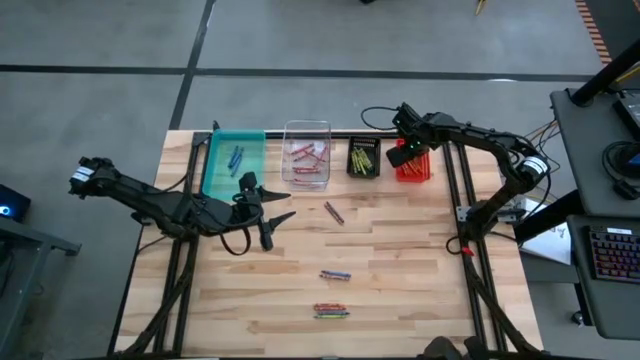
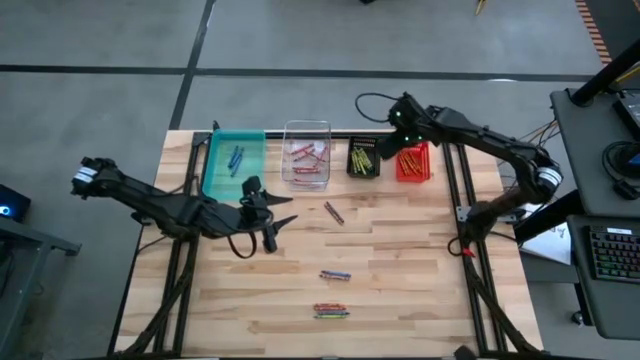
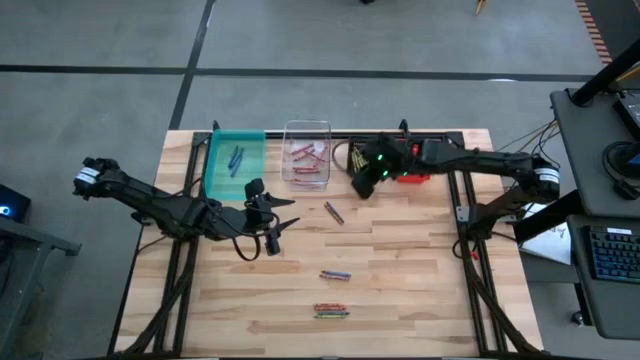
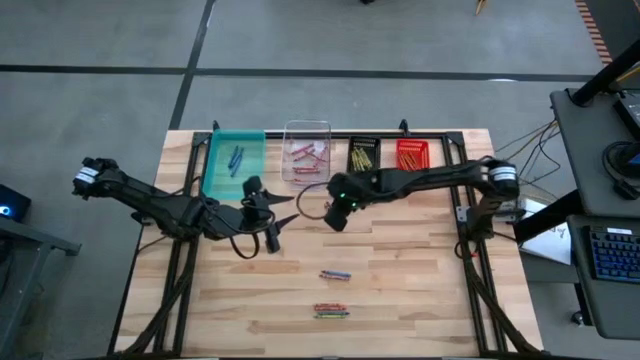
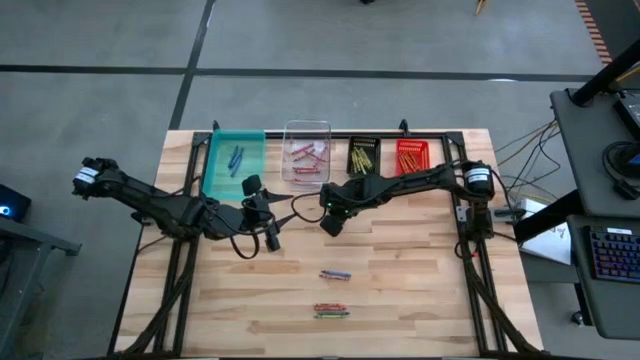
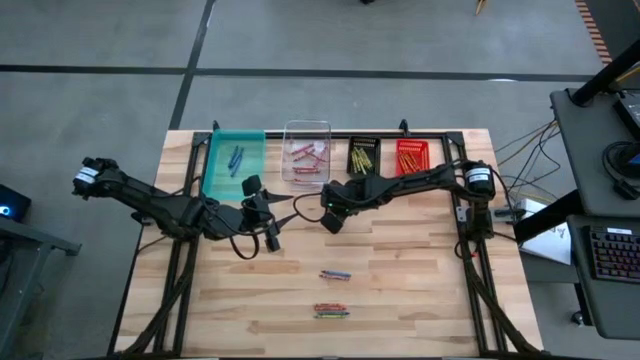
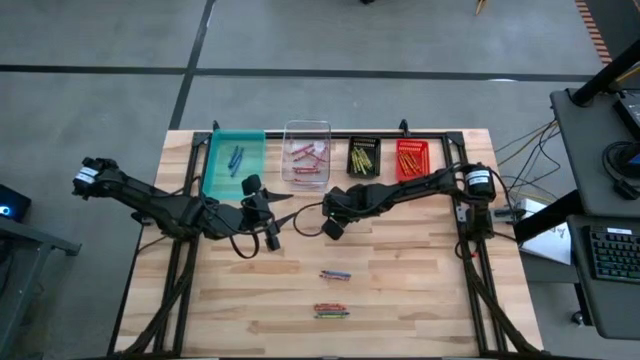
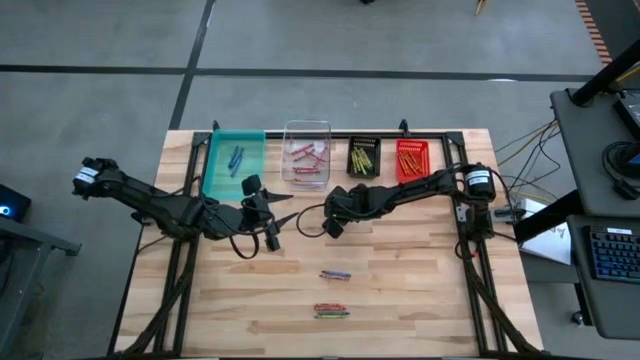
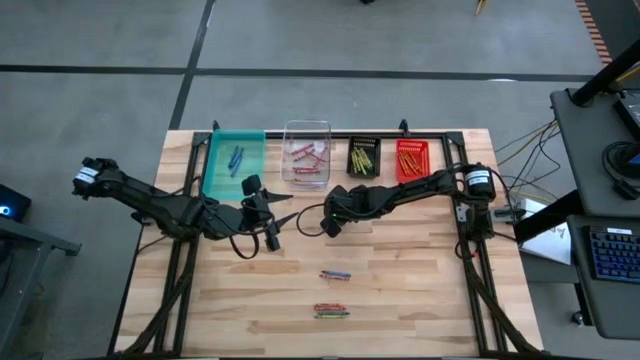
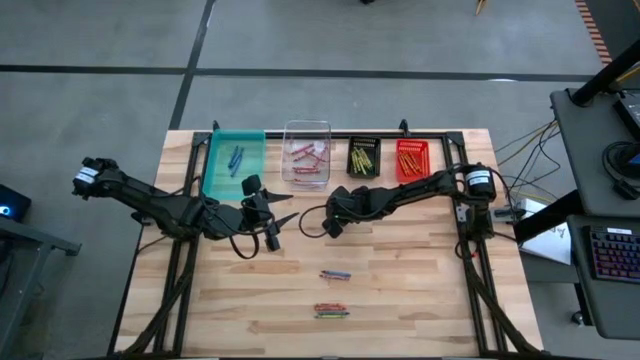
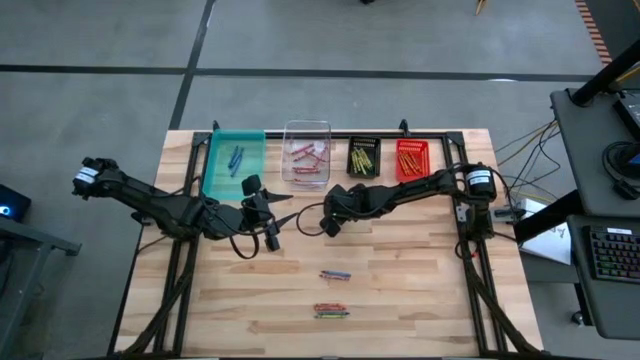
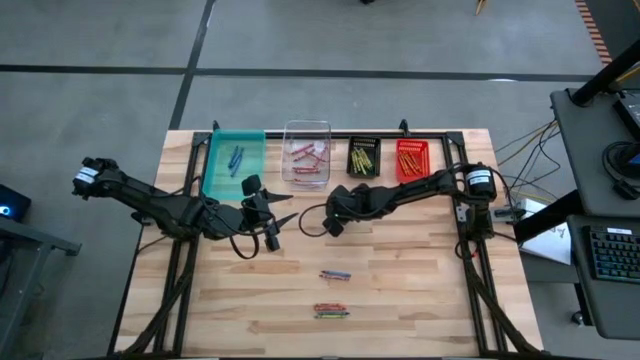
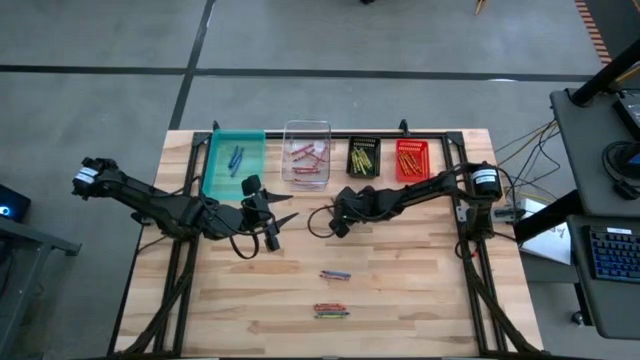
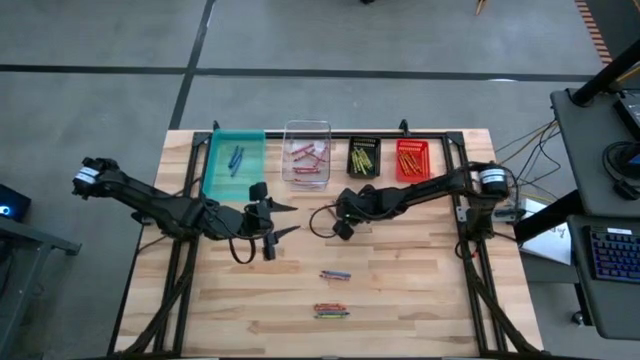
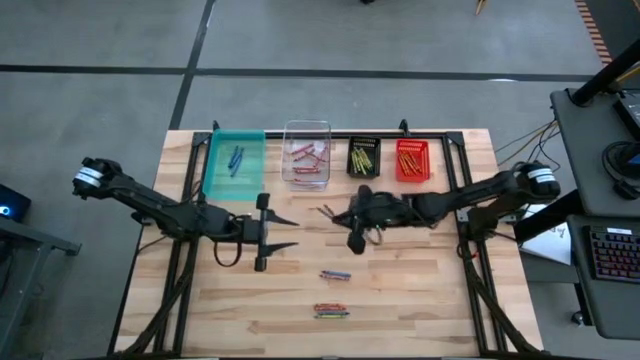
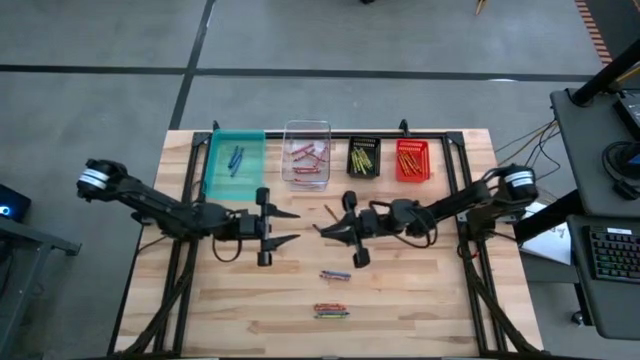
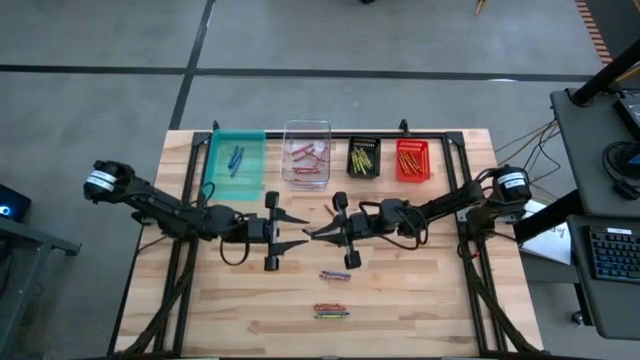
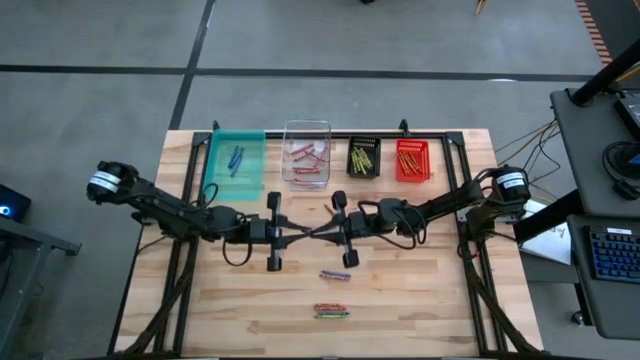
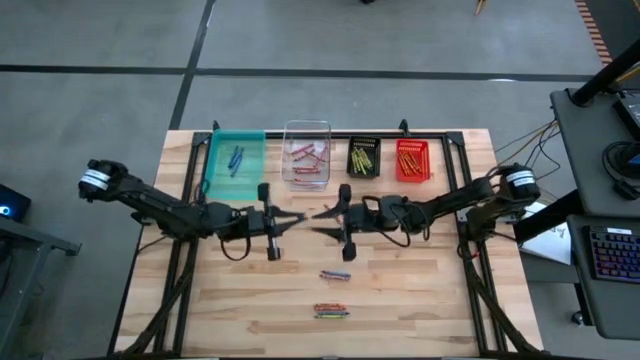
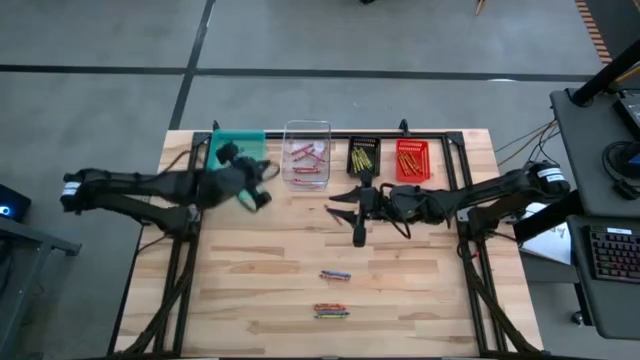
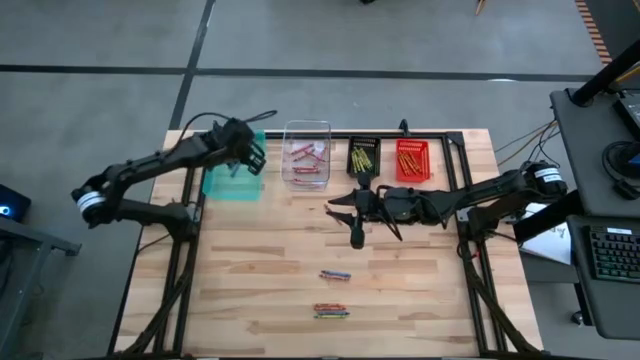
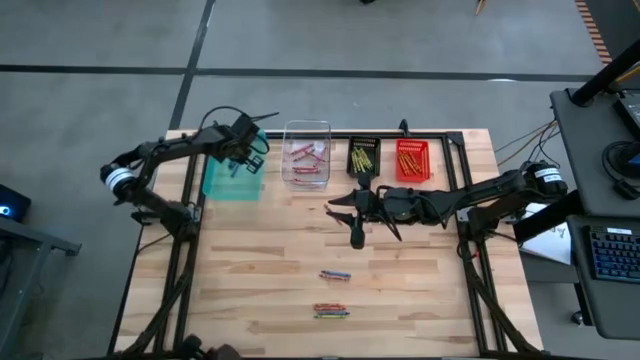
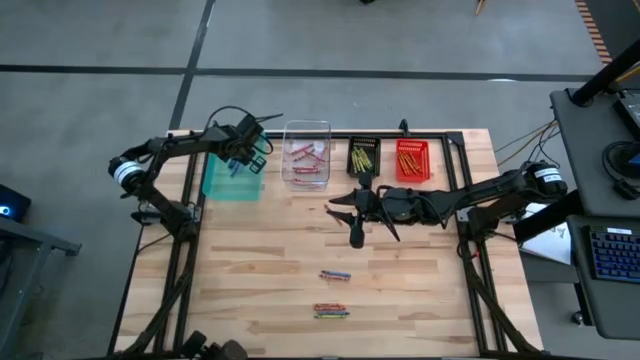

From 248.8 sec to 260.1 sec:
Task: Sort crayons
Put the blue crayon into the green transparent bin

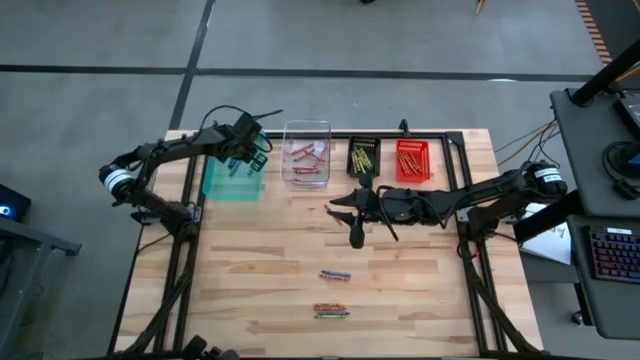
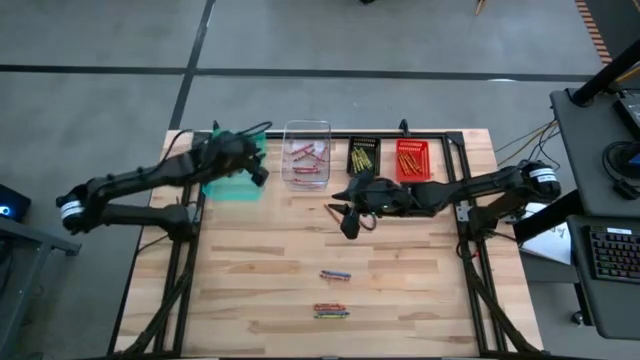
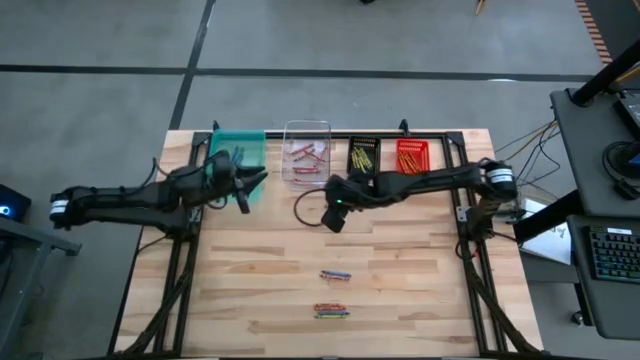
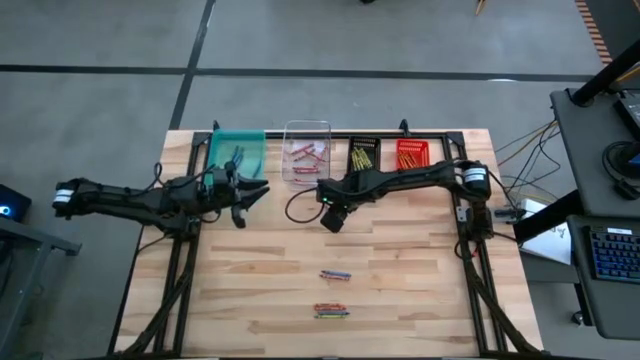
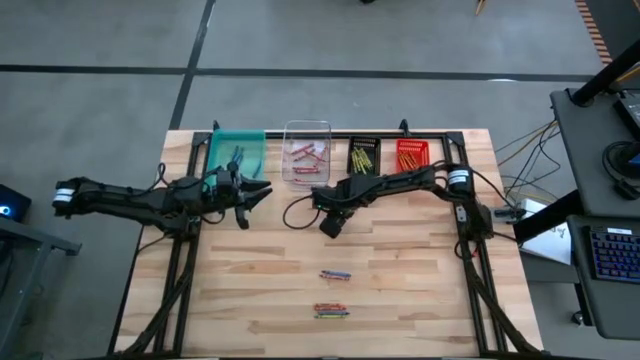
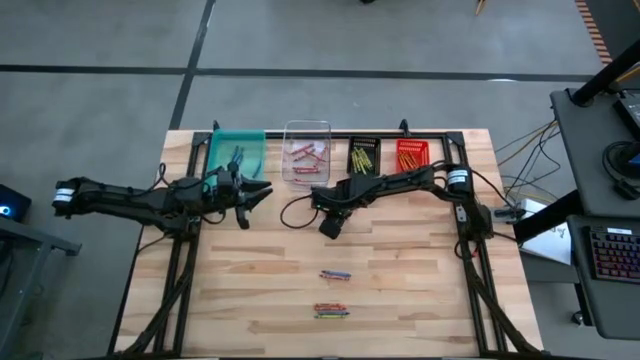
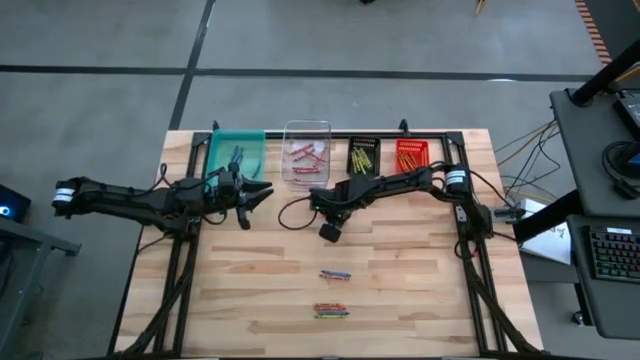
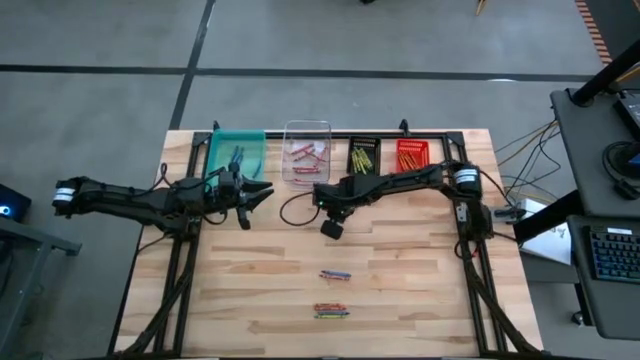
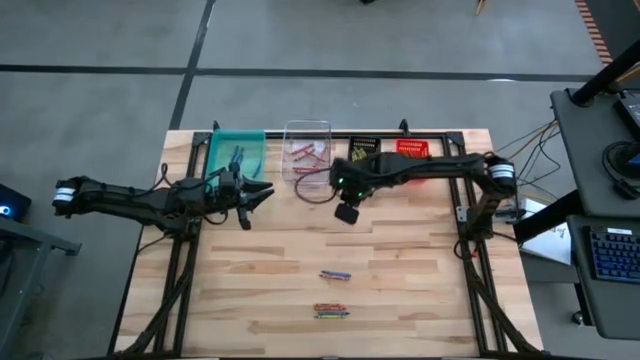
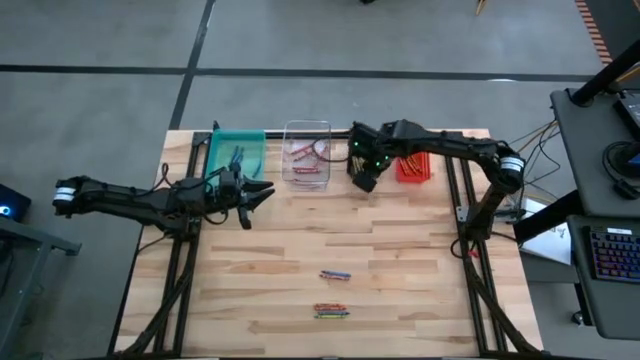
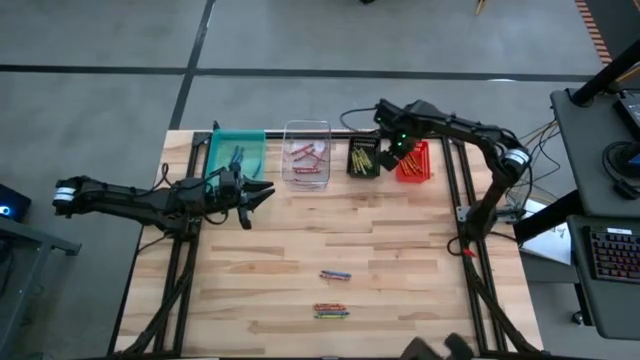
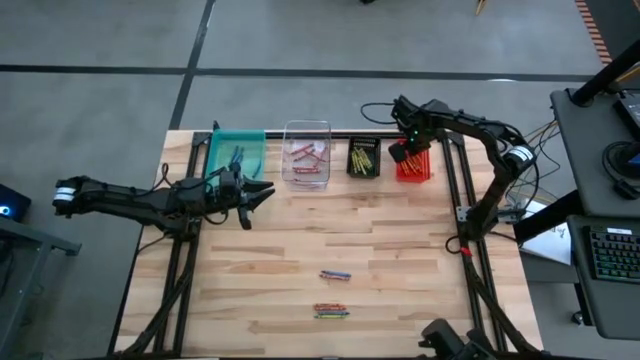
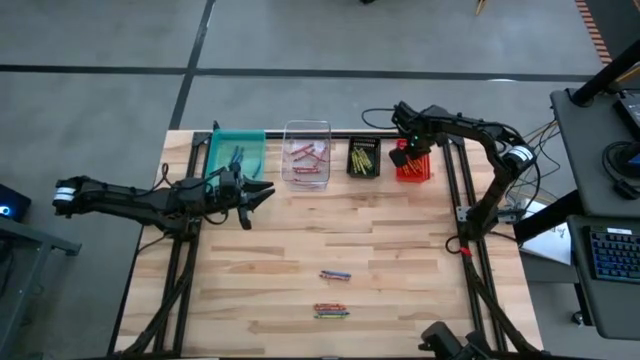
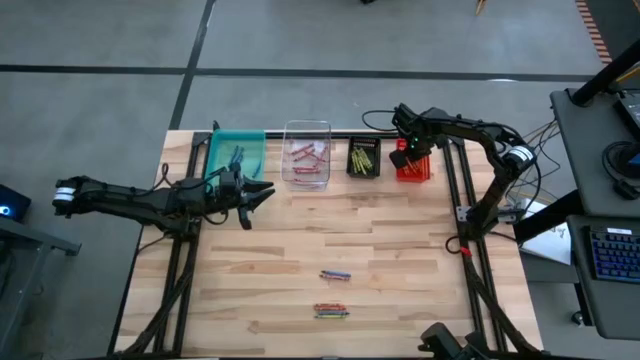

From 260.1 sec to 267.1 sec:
Put the orange crayon into the orange bin

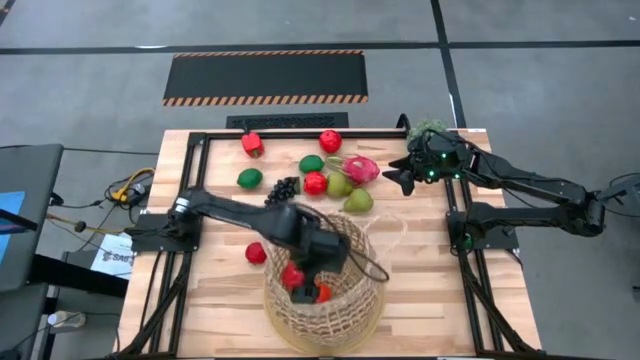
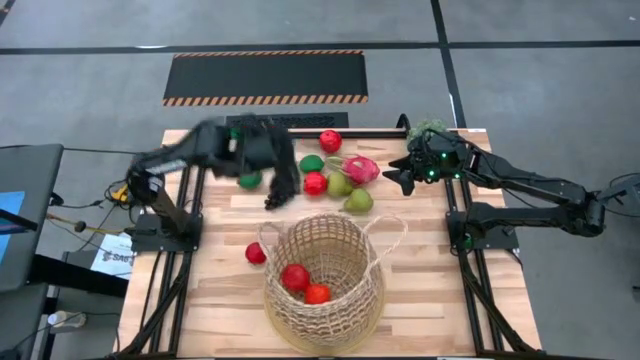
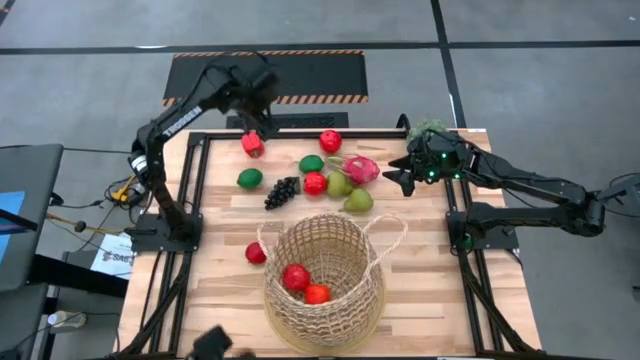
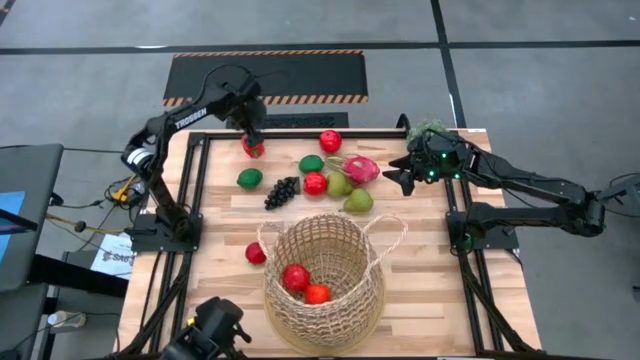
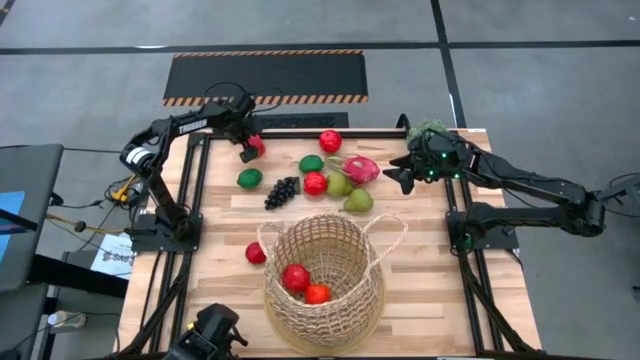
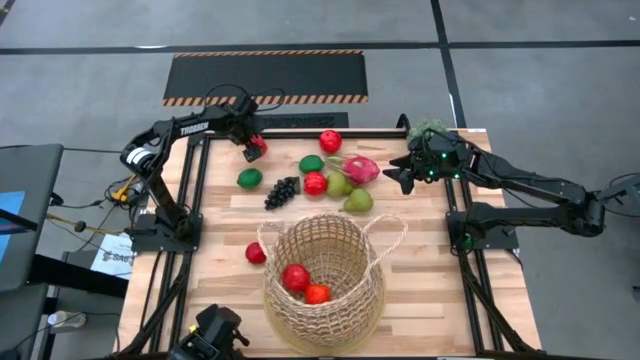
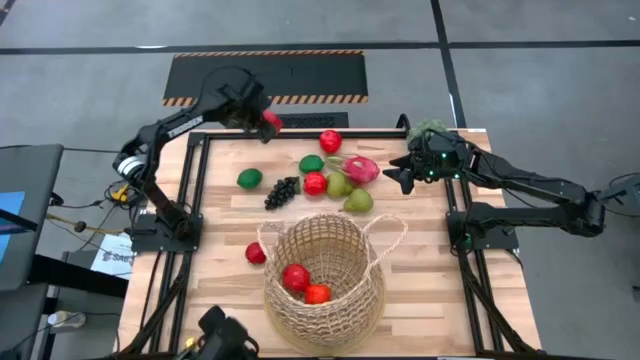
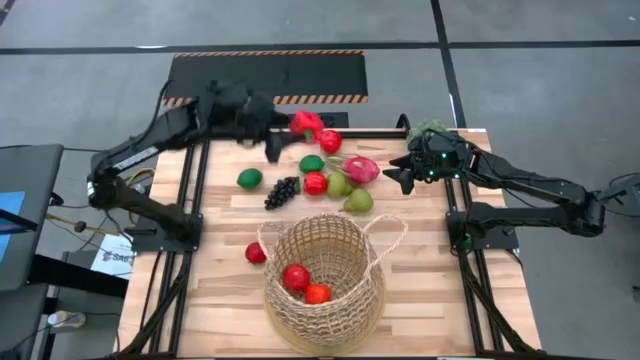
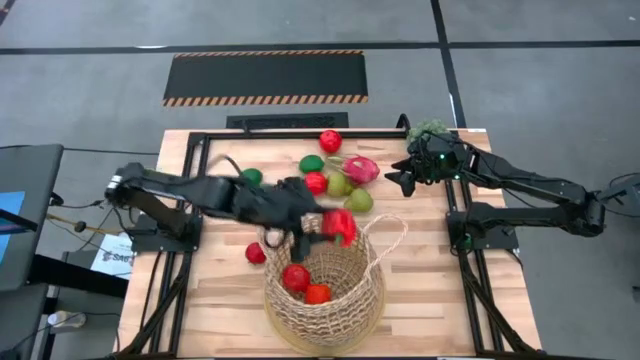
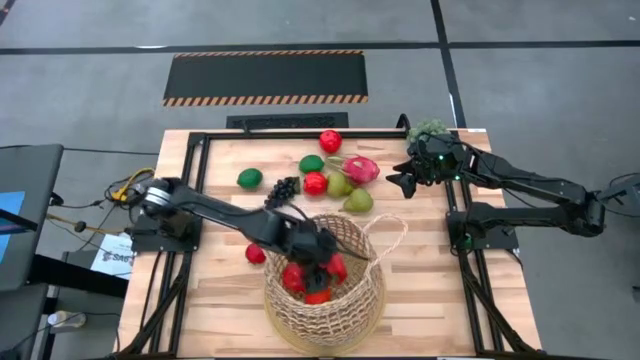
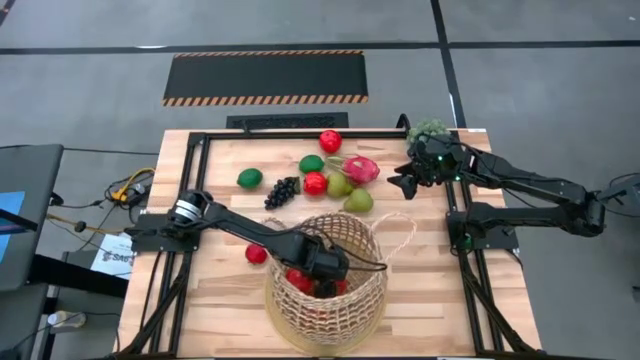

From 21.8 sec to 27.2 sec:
Task: Build produce basket
Put the bell pepper into the basket
